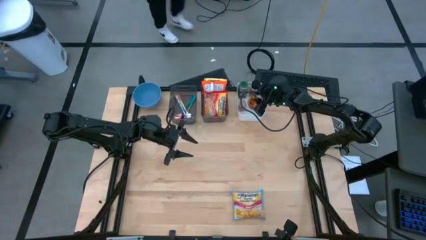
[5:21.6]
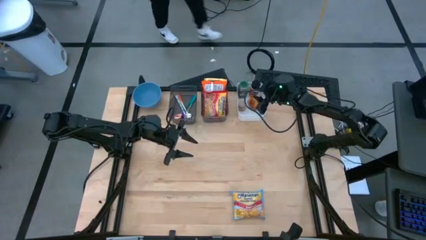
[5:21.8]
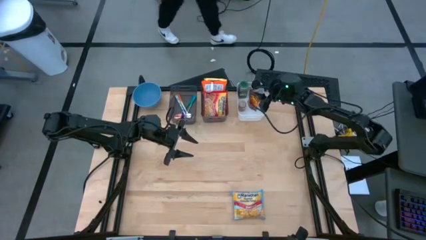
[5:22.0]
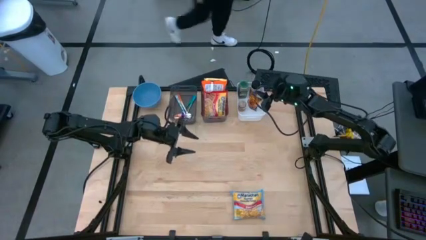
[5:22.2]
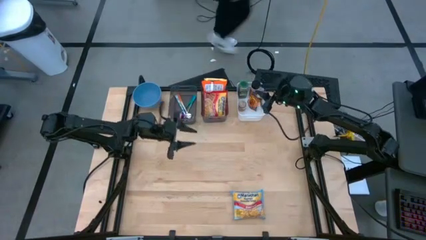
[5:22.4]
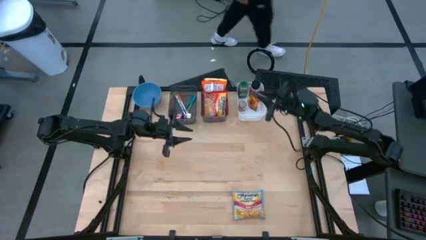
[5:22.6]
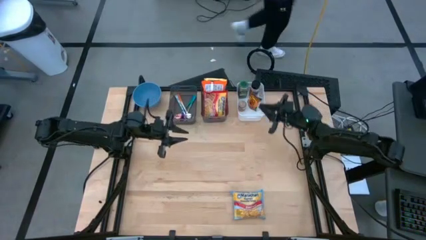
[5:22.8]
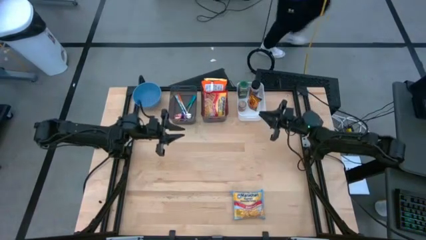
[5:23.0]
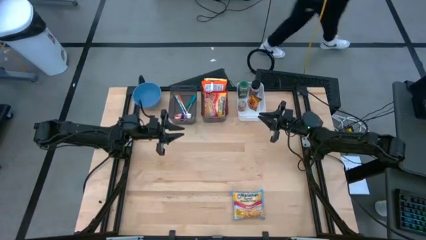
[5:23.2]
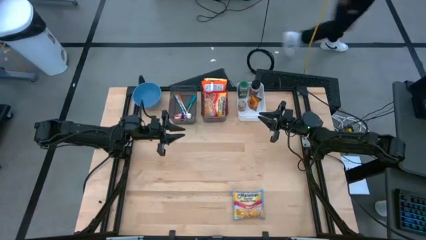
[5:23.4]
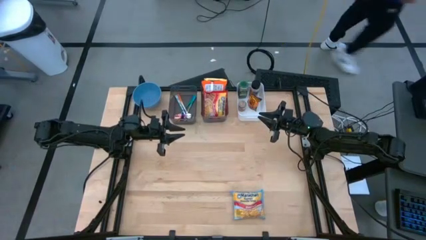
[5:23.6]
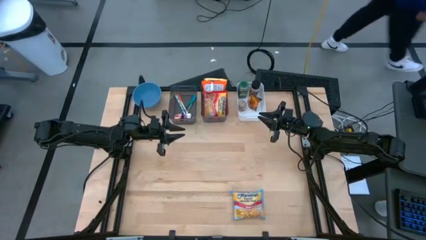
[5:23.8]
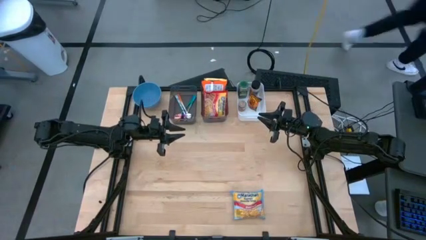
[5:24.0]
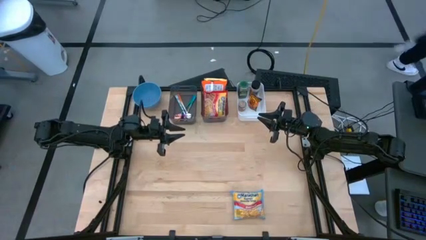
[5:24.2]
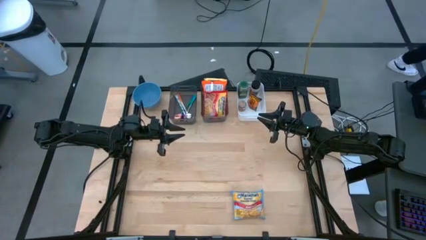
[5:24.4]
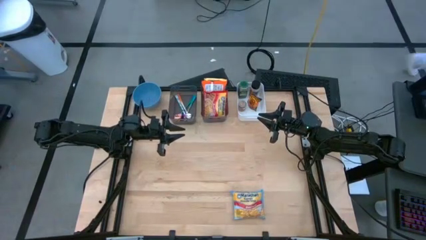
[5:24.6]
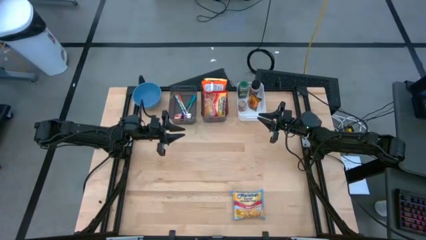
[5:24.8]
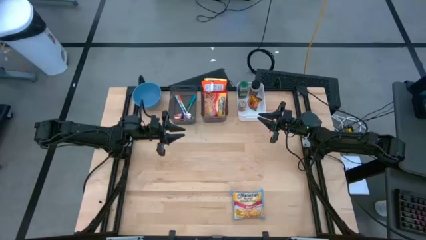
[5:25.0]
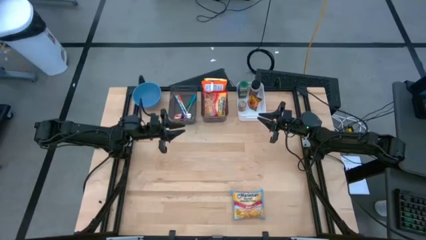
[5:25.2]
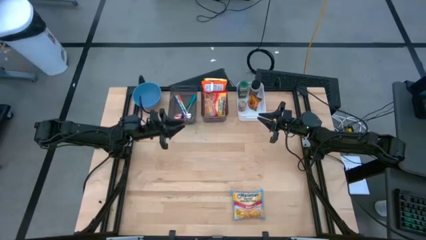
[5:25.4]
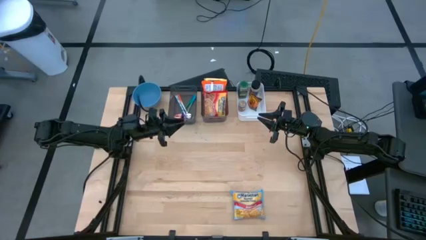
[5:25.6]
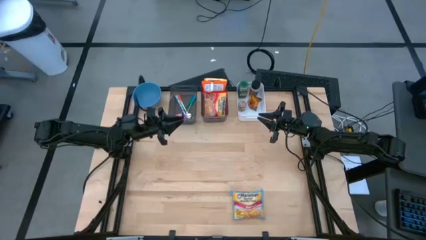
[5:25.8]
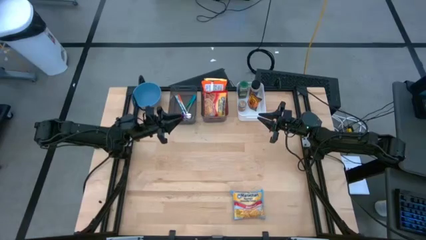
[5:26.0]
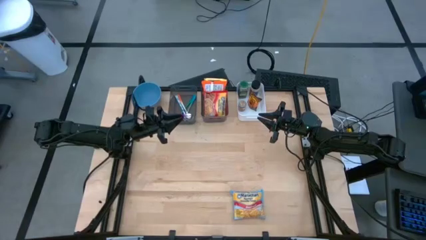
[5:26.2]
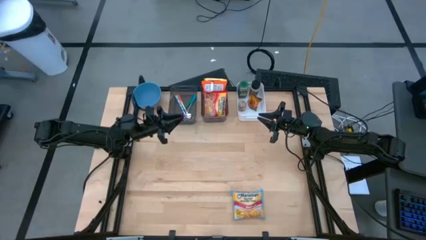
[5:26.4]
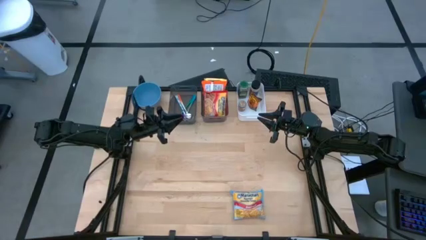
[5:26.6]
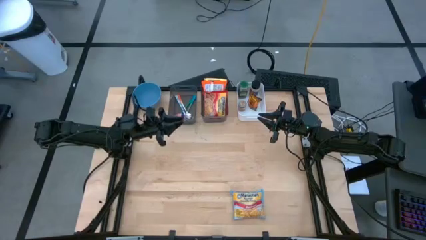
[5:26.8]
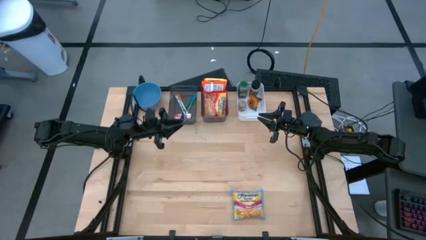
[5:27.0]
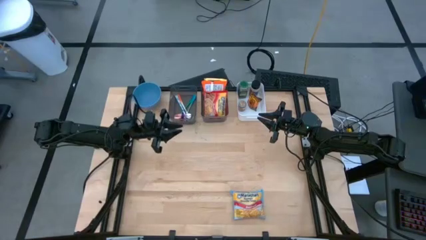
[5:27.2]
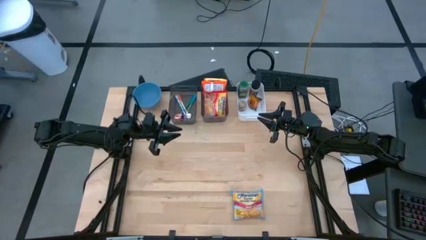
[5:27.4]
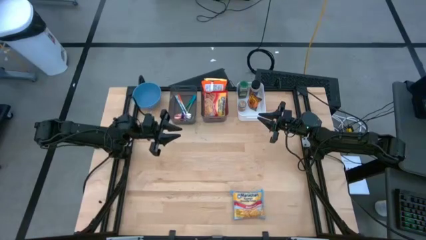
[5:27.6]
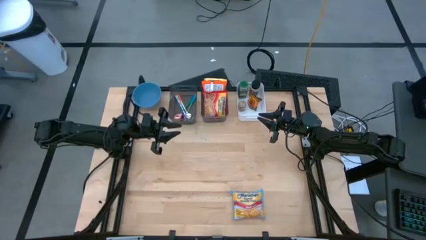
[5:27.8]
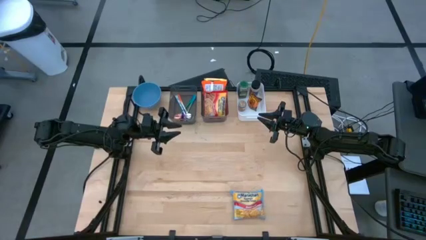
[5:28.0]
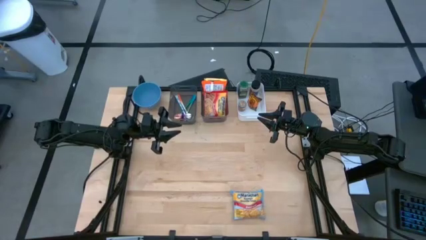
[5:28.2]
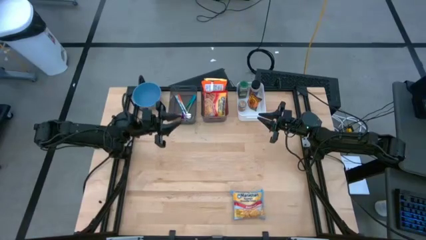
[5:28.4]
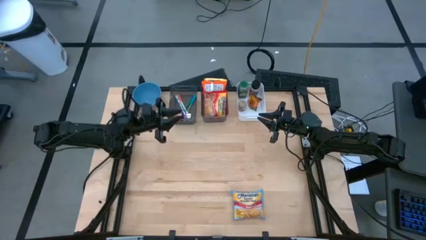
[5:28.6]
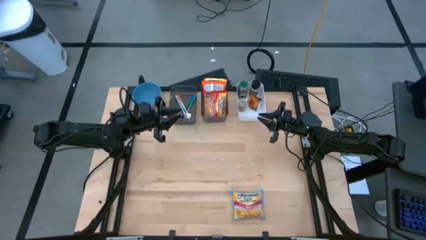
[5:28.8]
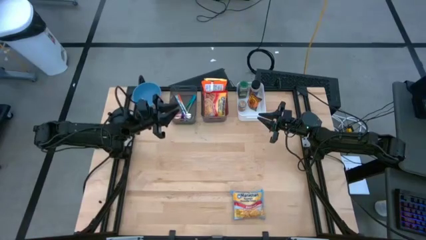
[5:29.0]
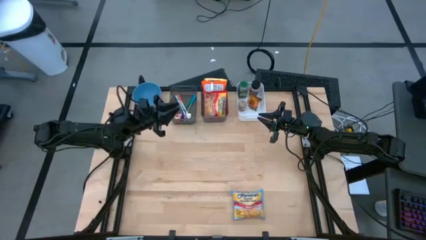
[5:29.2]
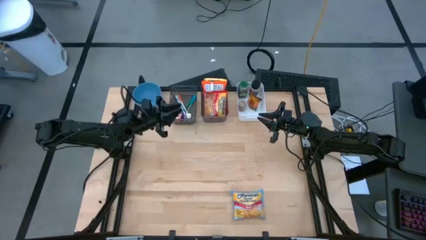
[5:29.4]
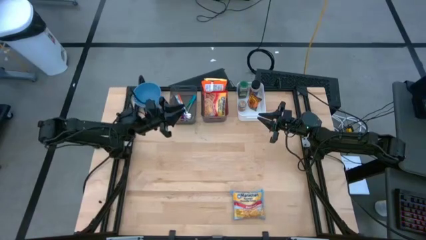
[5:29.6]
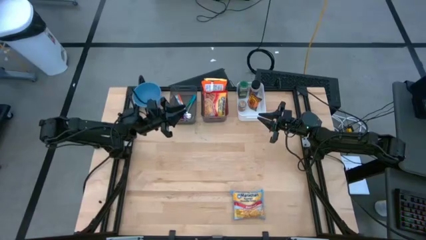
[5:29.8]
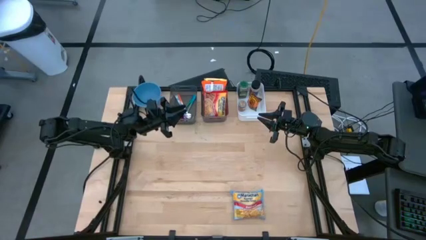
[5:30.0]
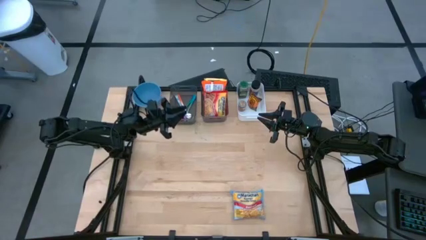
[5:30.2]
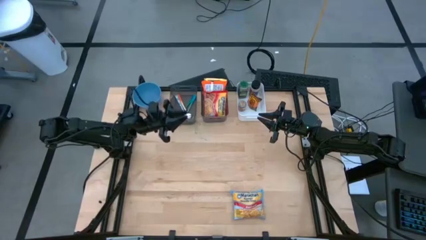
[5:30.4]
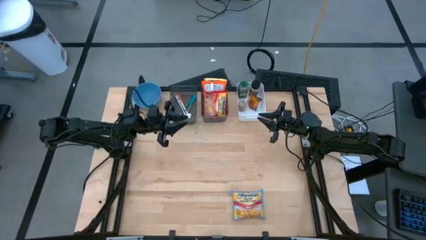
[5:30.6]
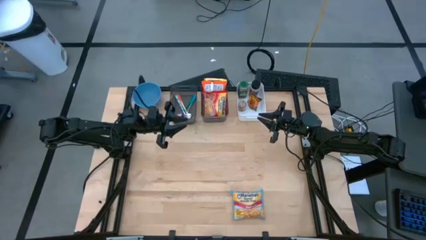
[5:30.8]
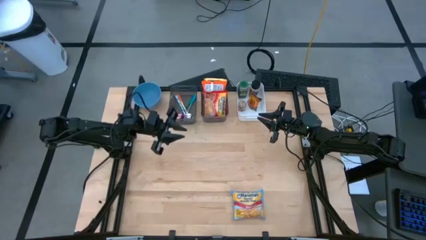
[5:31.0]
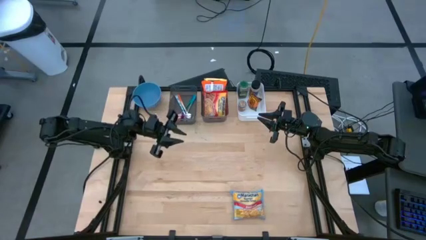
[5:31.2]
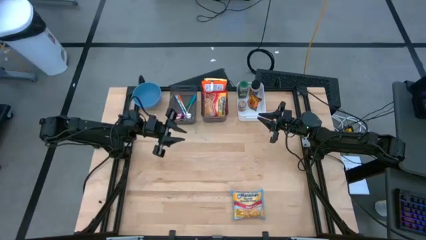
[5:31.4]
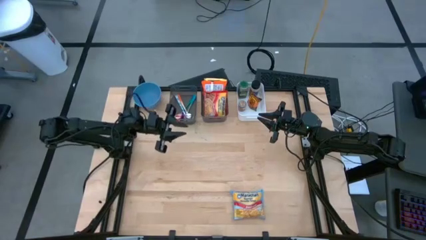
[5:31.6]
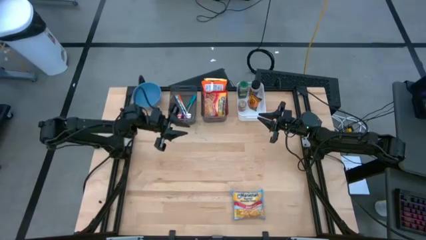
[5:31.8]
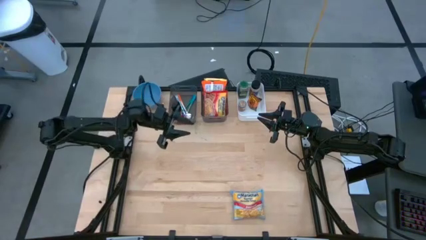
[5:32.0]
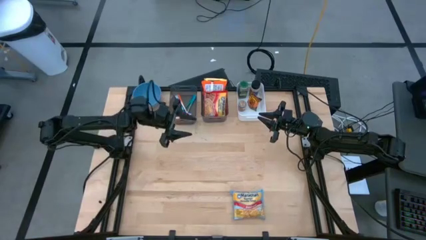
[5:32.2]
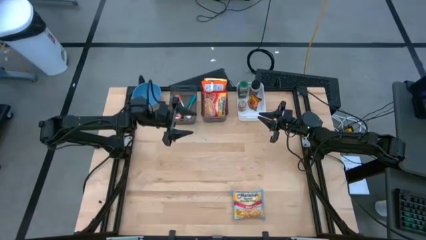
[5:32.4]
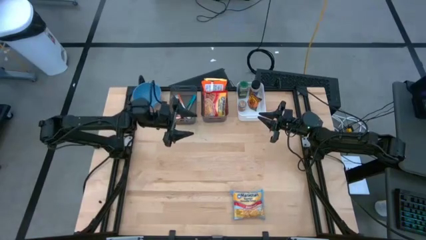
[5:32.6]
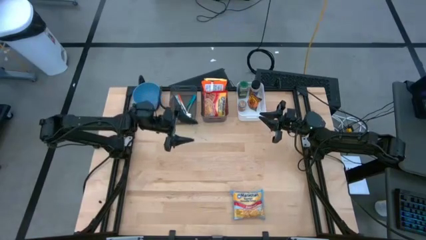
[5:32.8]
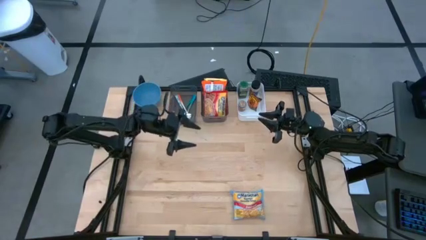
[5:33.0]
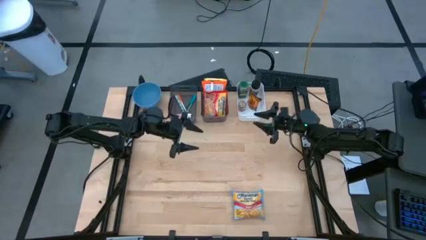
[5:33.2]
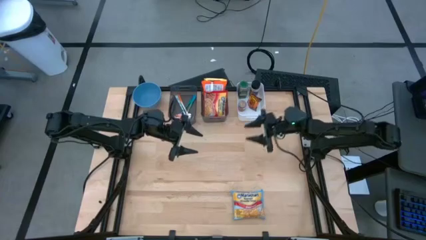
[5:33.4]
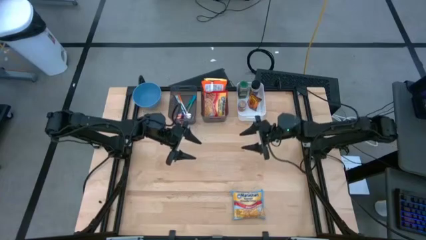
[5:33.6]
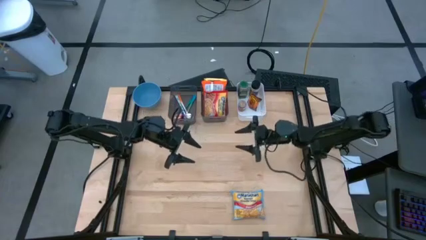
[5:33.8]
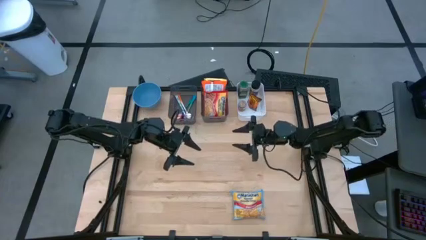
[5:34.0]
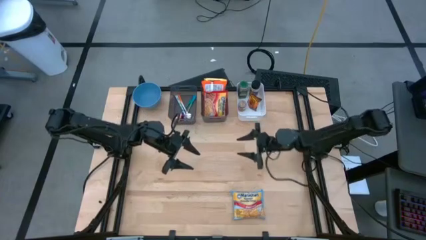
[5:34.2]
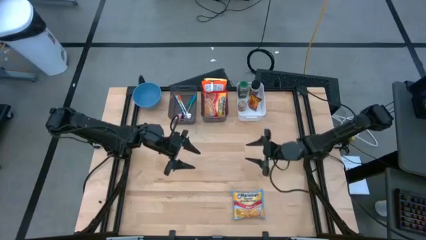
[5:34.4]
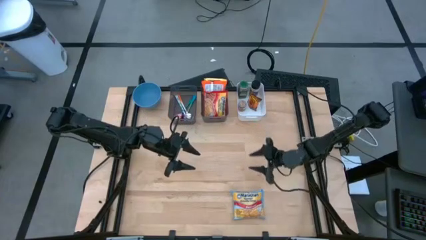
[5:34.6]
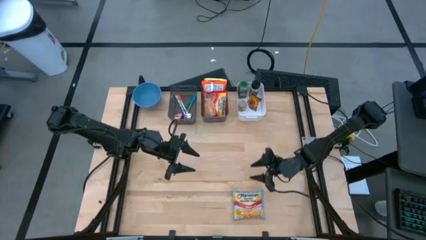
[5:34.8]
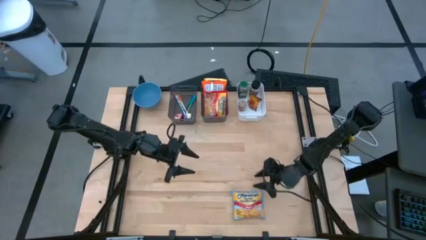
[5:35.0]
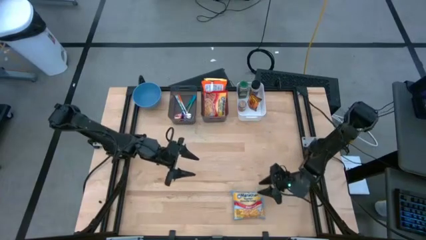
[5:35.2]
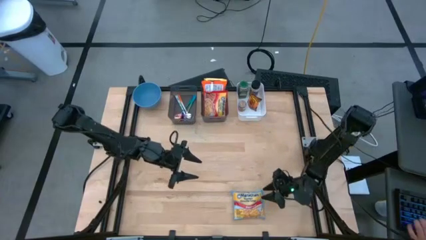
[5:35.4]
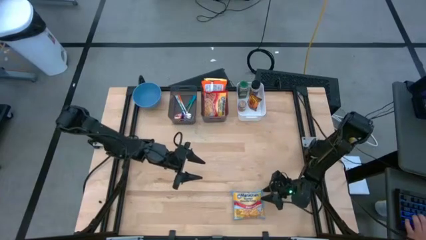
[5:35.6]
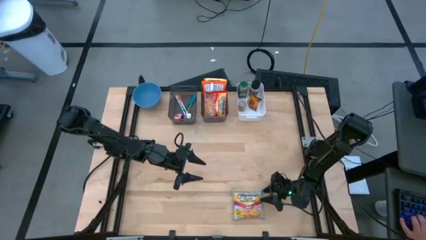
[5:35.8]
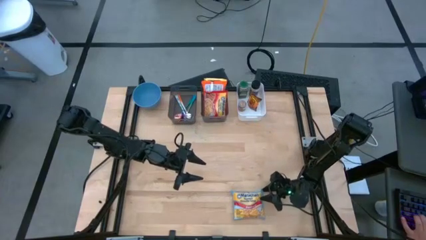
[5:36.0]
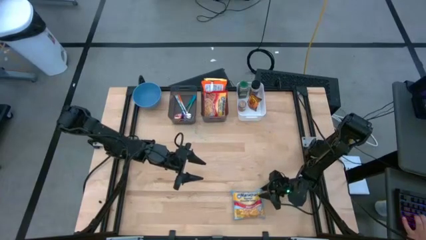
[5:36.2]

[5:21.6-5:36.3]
Task: Pick & Place Food Item
Put the blue noodle pack into the right black bin
